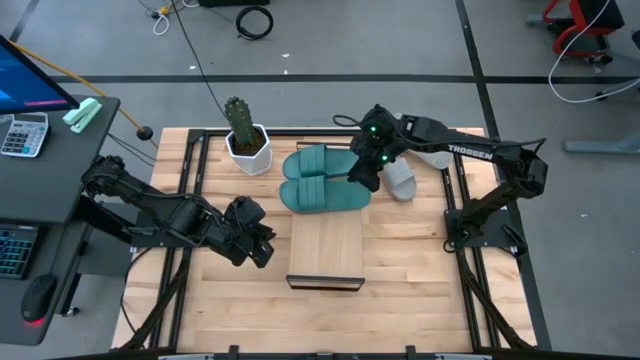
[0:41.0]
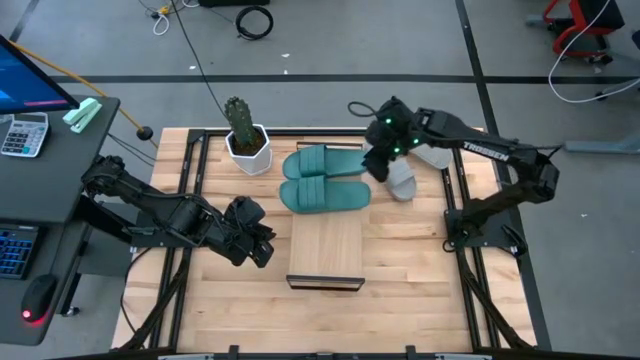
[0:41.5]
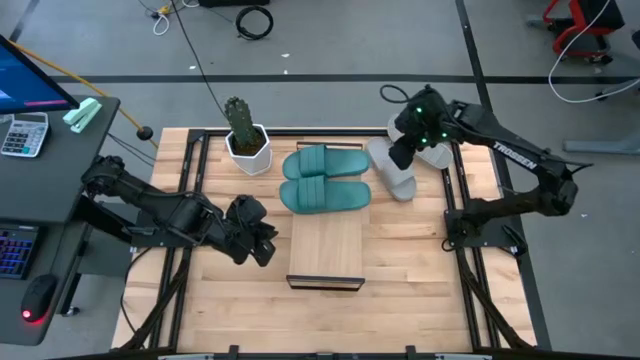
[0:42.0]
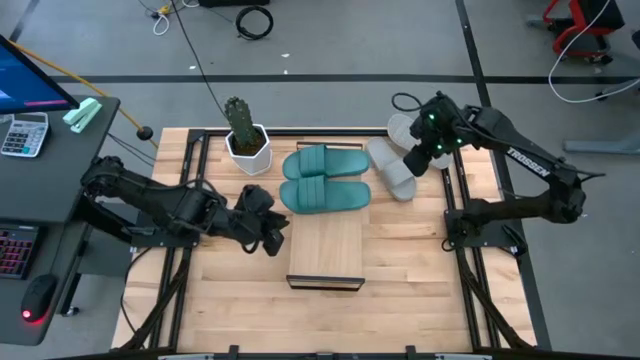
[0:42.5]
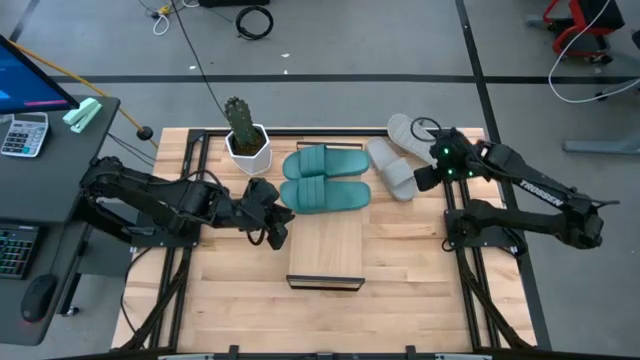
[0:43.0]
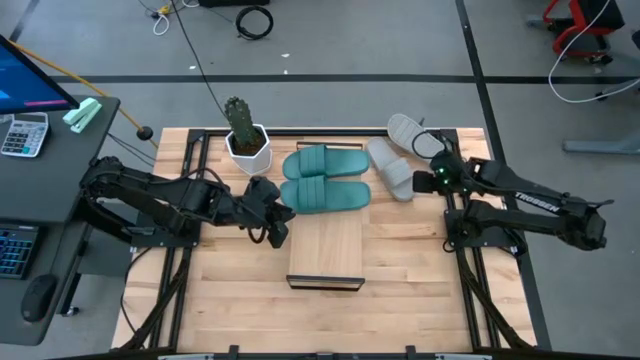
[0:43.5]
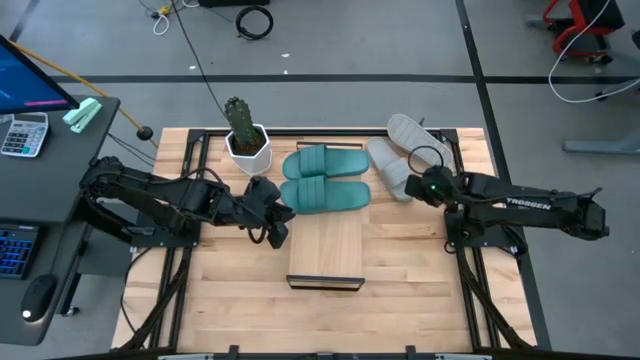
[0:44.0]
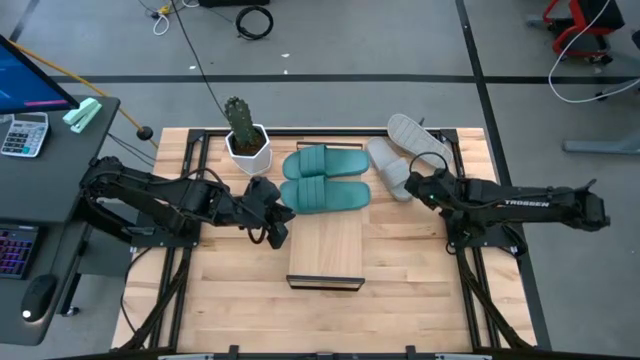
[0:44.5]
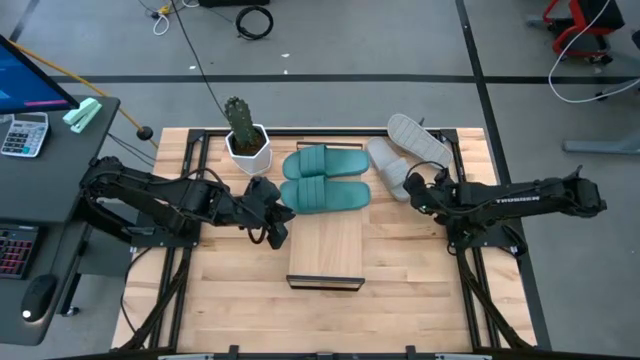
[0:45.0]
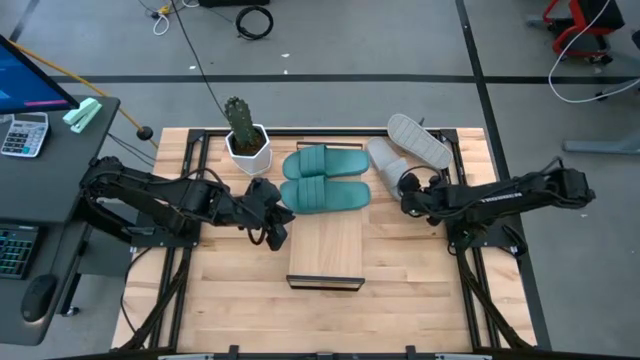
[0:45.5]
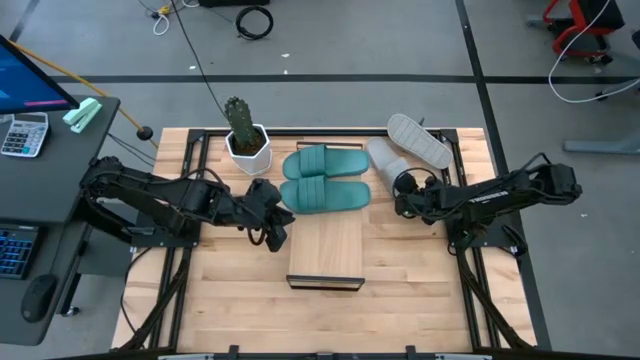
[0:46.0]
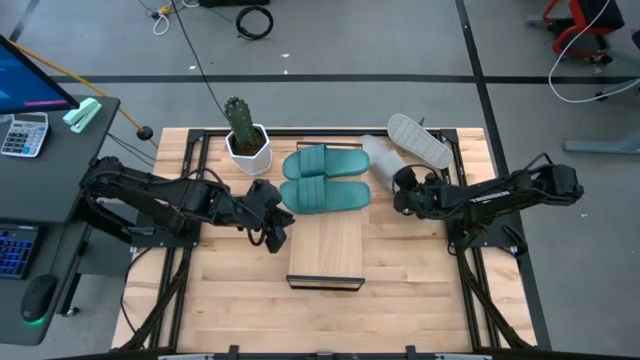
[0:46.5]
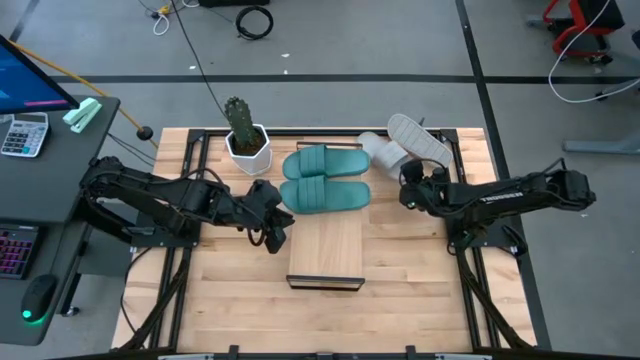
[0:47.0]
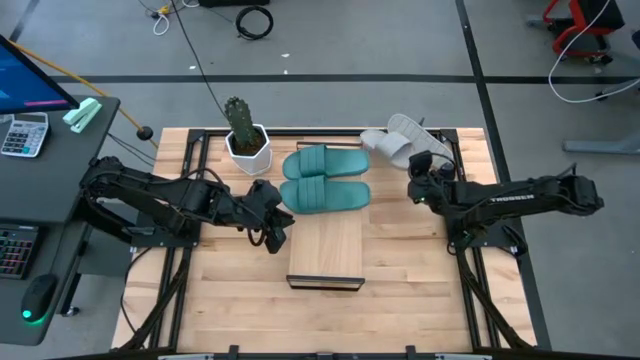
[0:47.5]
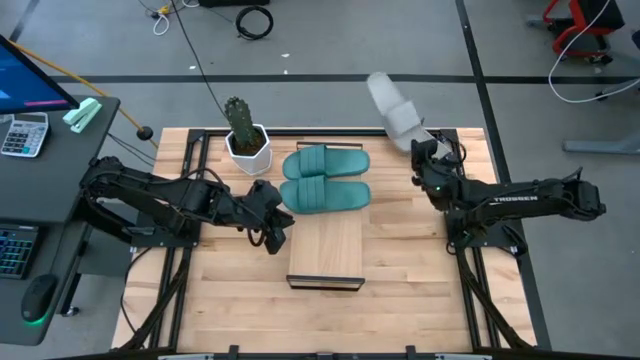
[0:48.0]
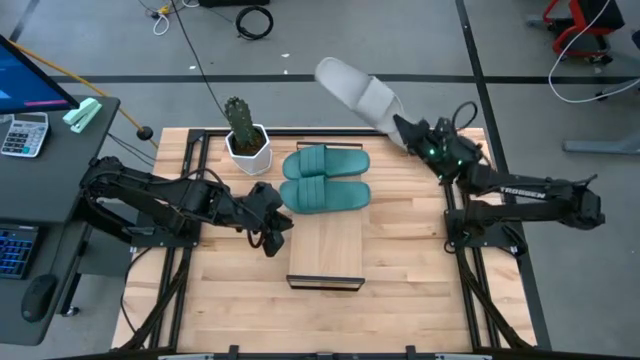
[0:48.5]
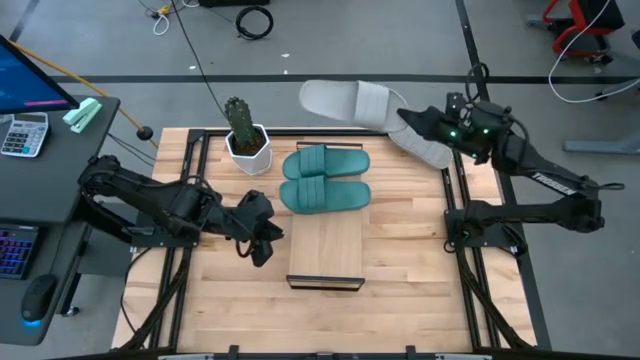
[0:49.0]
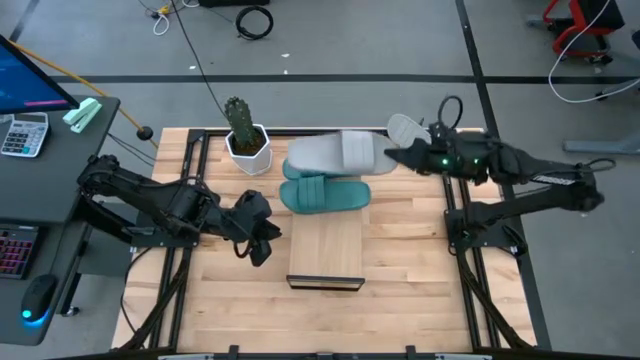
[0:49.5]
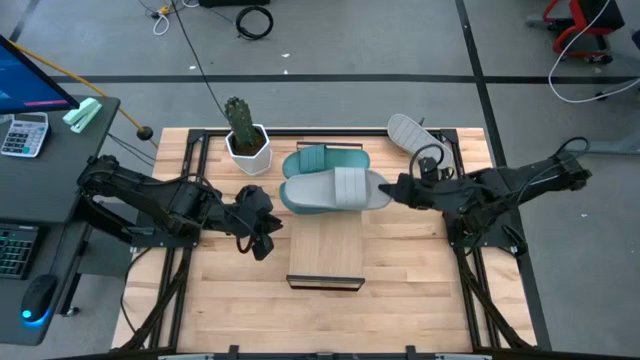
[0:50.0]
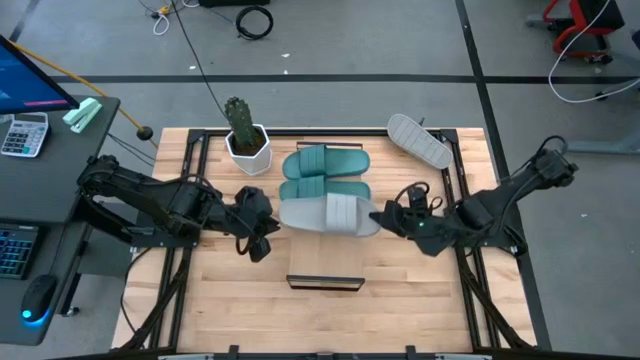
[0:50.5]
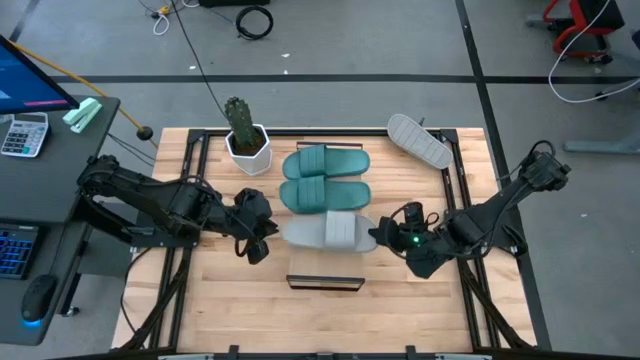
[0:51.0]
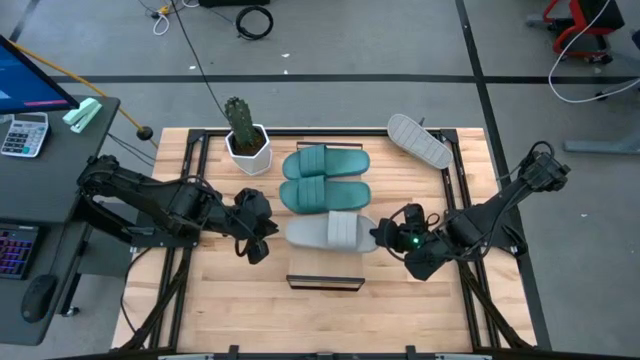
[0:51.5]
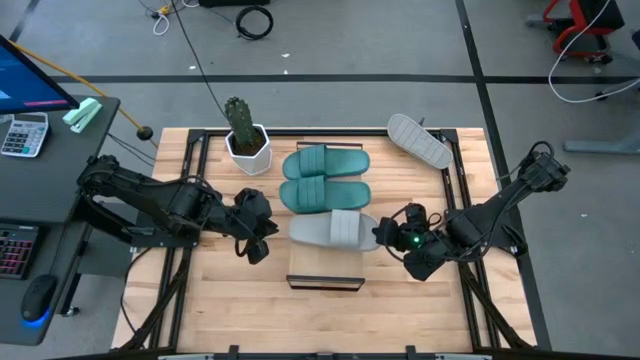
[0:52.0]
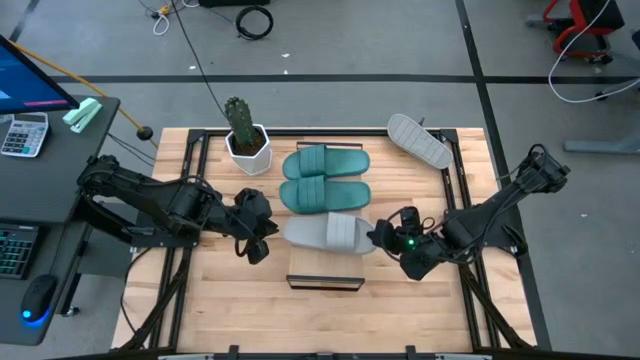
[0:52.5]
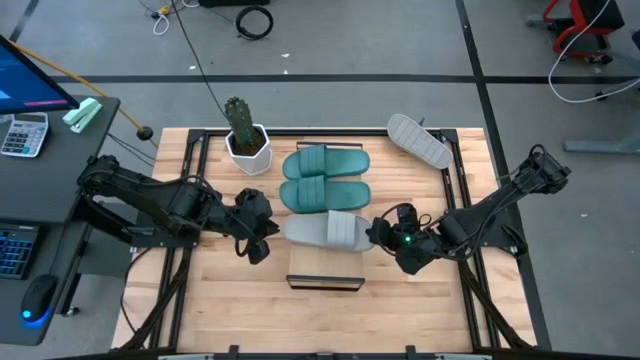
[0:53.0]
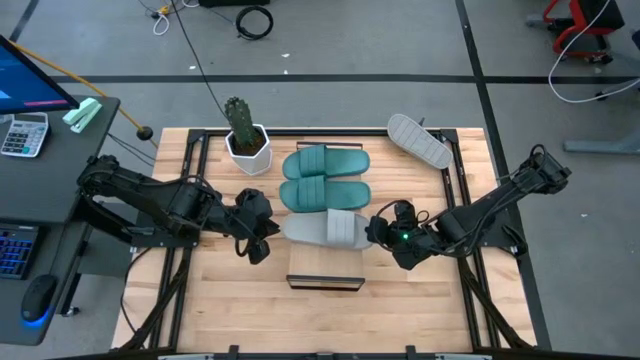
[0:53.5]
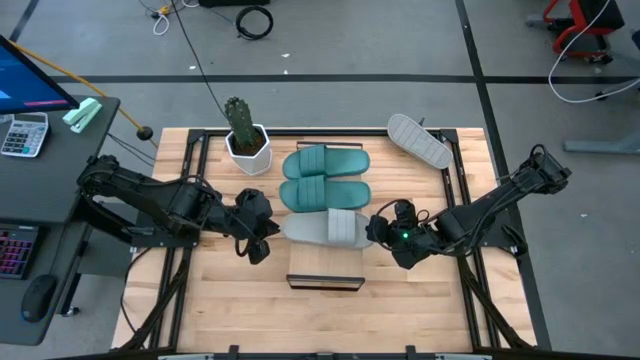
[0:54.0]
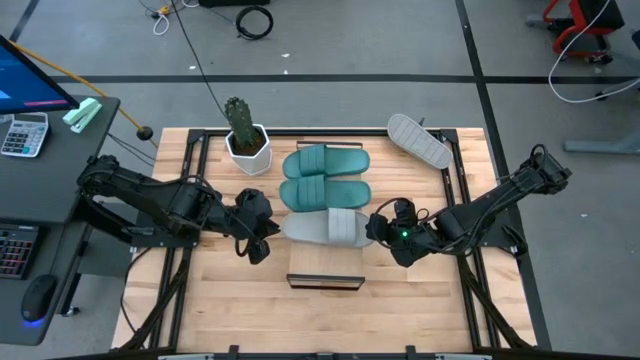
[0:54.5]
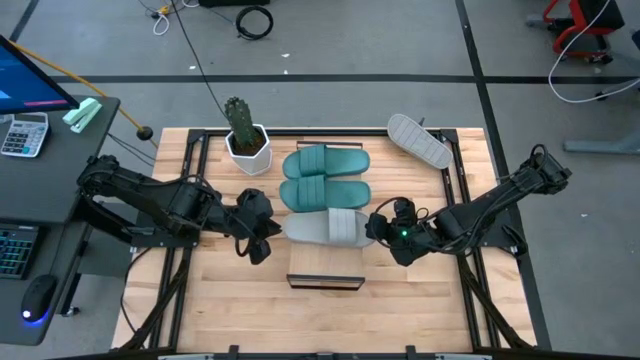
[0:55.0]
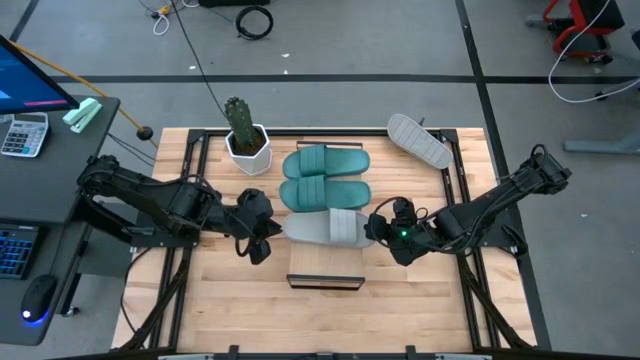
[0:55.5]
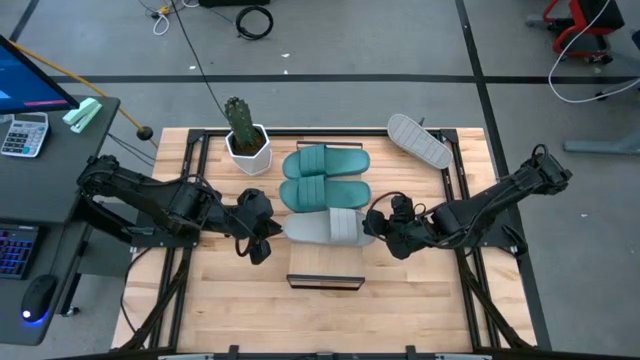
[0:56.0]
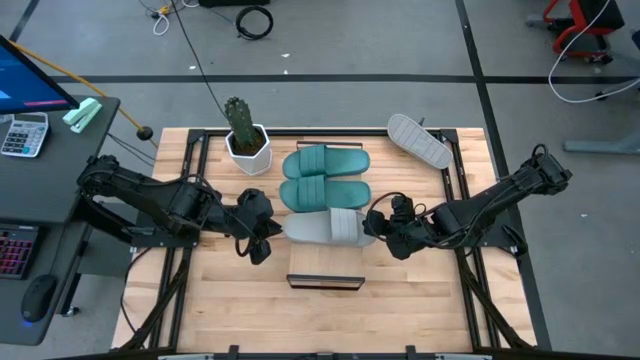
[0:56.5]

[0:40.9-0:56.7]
Task: Pick and place slides into the shelf
Put the left gray slide on the shelf

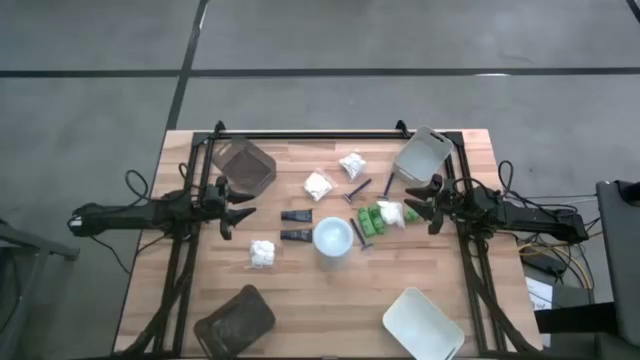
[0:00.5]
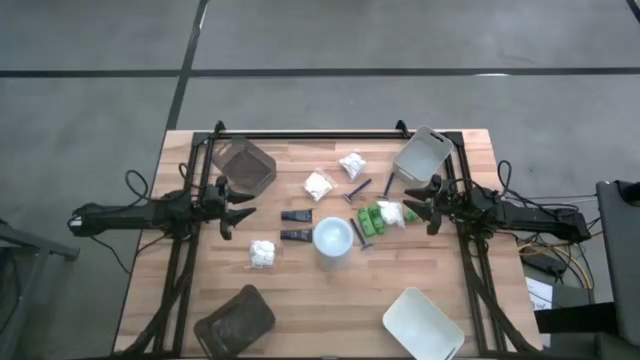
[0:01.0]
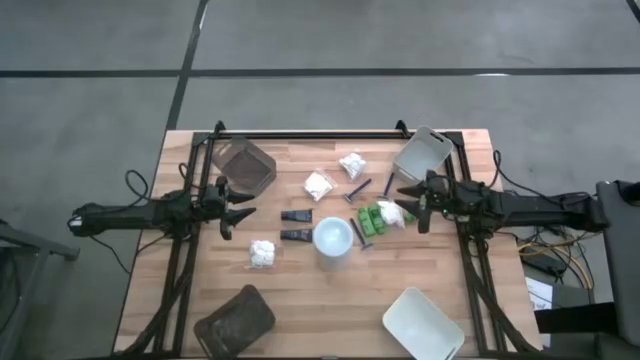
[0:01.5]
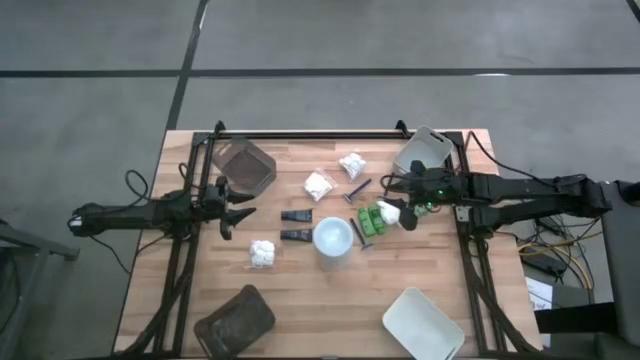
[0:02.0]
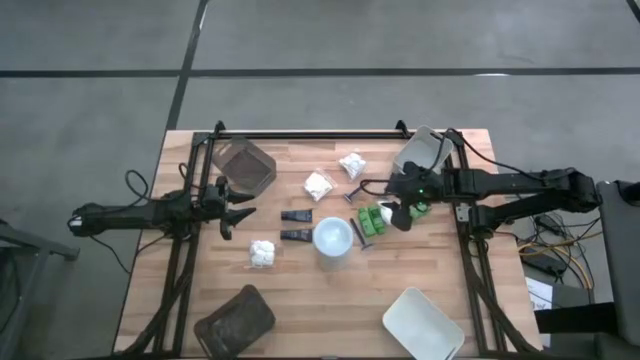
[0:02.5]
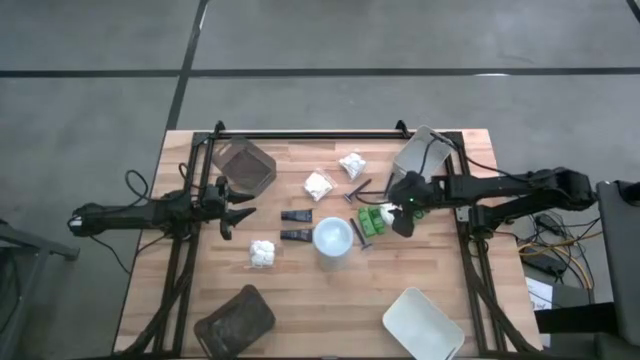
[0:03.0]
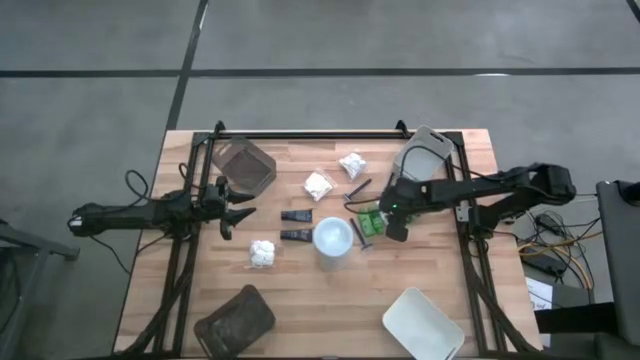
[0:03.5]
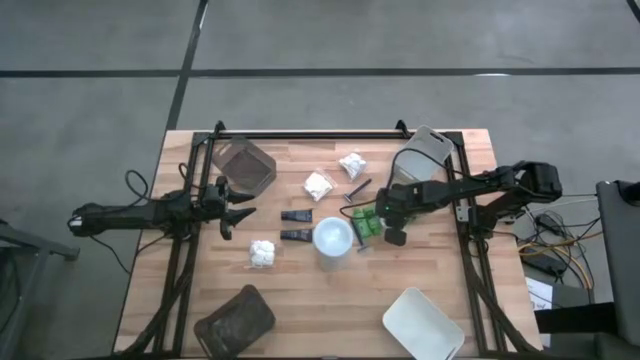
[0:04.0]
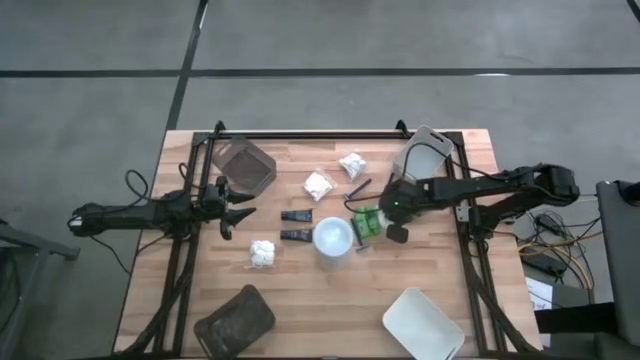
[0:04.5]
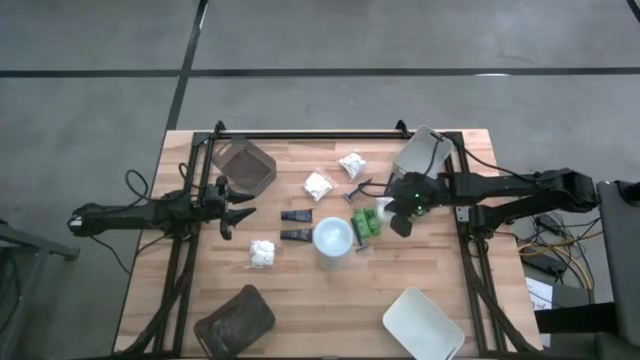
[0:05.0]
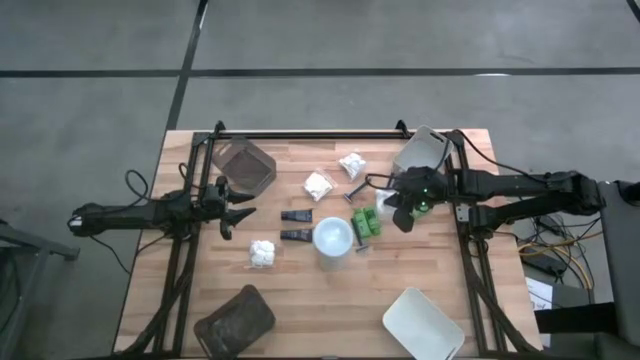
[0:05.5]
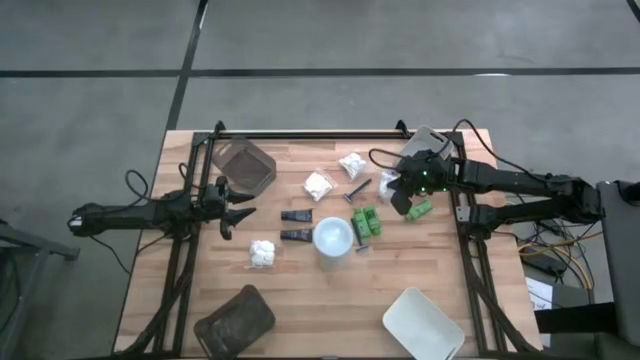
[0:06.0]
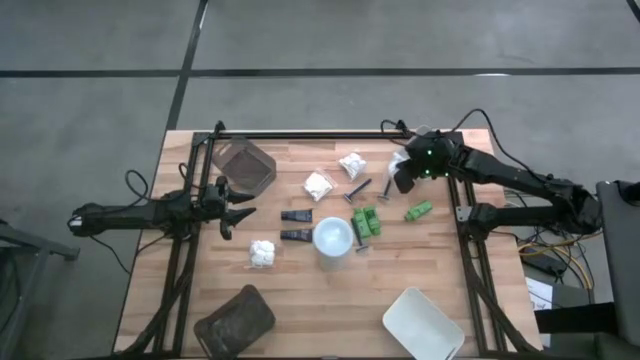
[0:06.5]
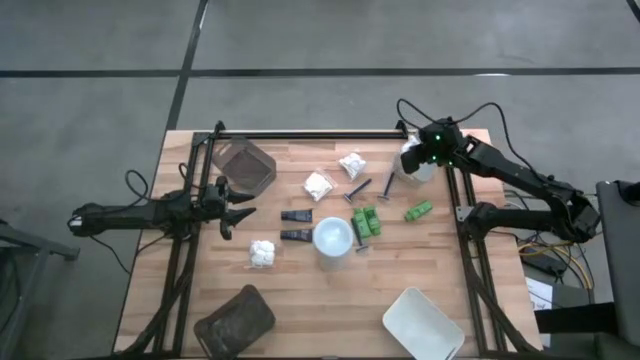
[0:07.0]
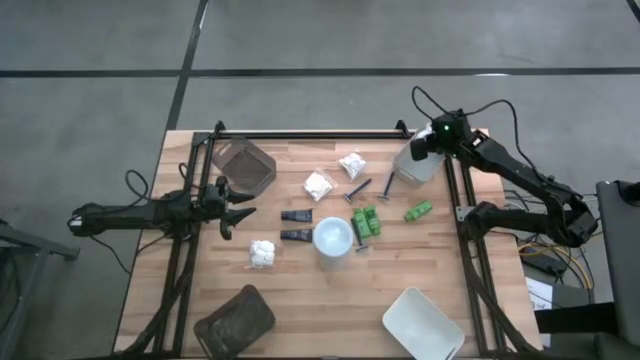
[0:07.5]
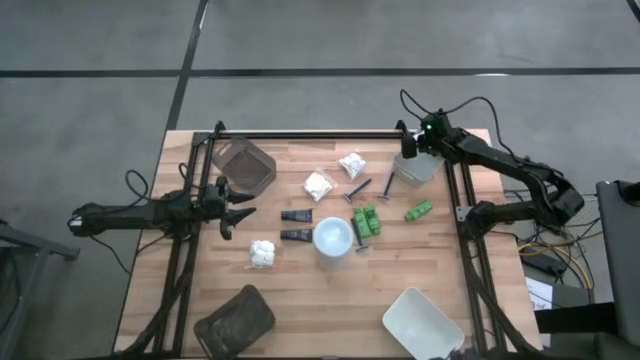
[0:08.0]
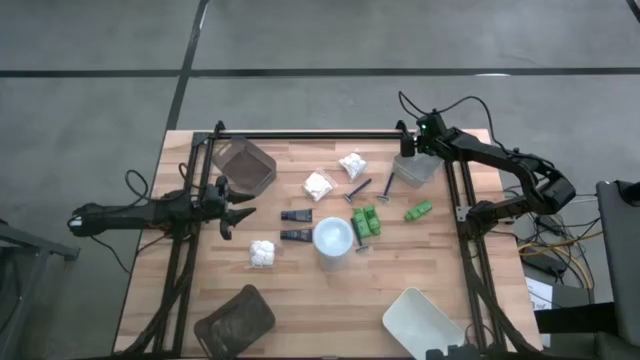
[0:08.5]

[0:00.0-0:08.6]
Task: Pick & Place Travel size toiletries
Put the white cotton pack into the gray bin
